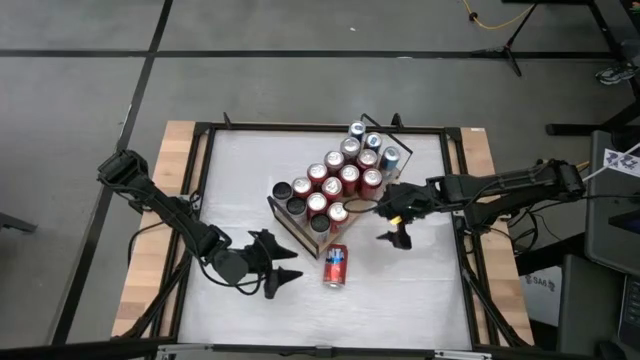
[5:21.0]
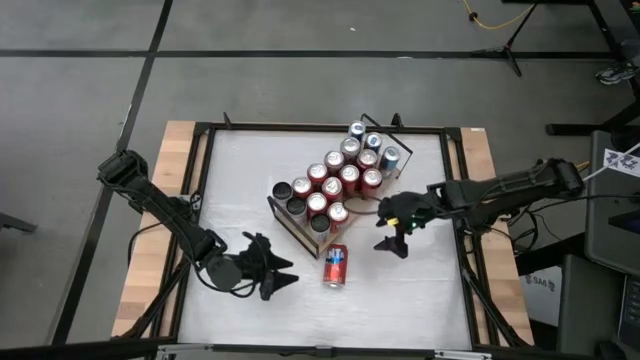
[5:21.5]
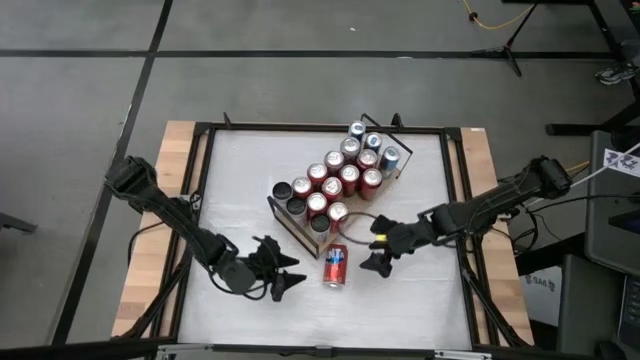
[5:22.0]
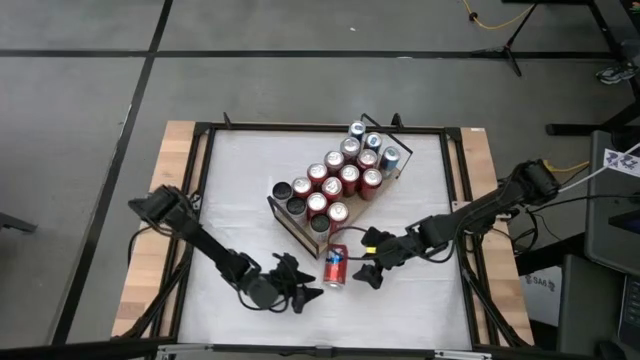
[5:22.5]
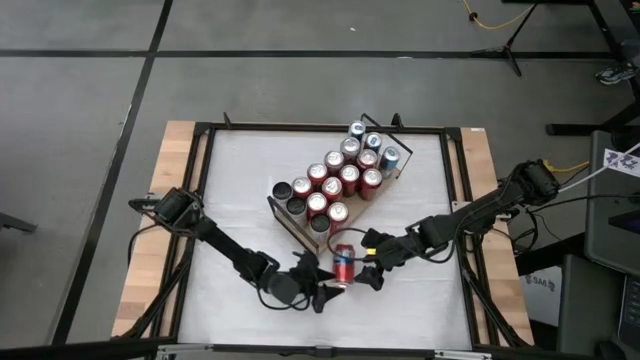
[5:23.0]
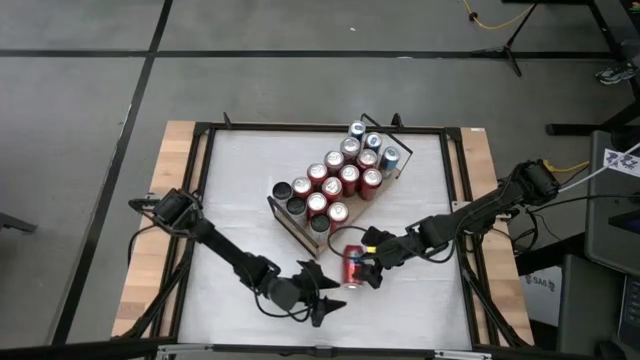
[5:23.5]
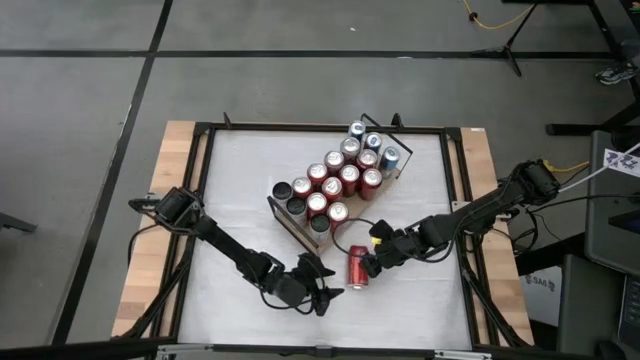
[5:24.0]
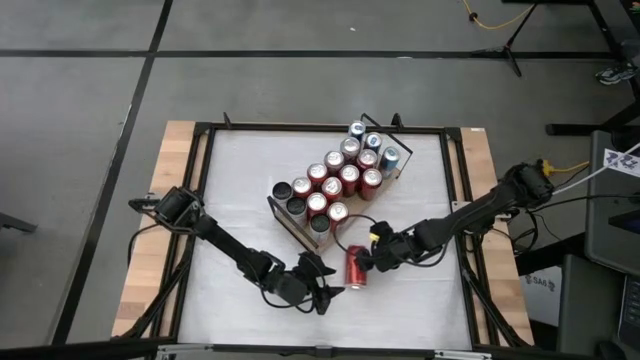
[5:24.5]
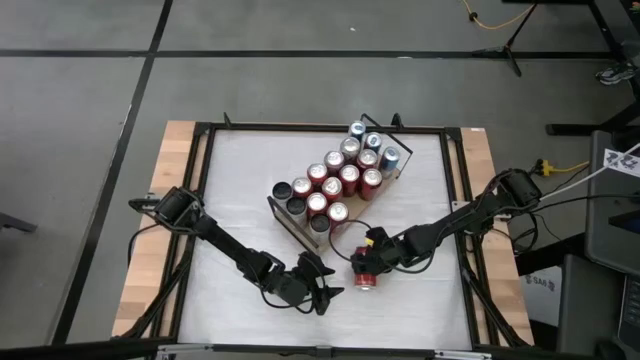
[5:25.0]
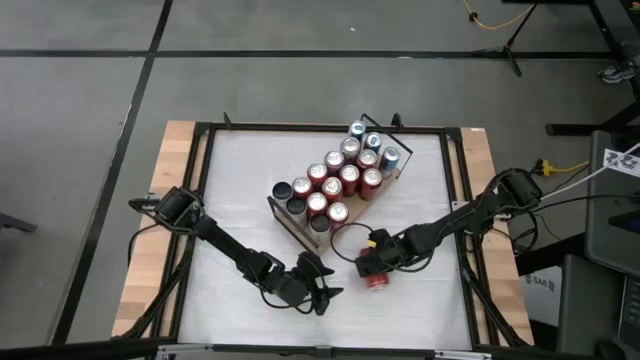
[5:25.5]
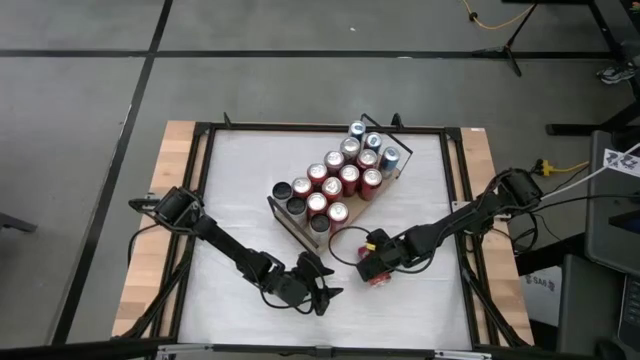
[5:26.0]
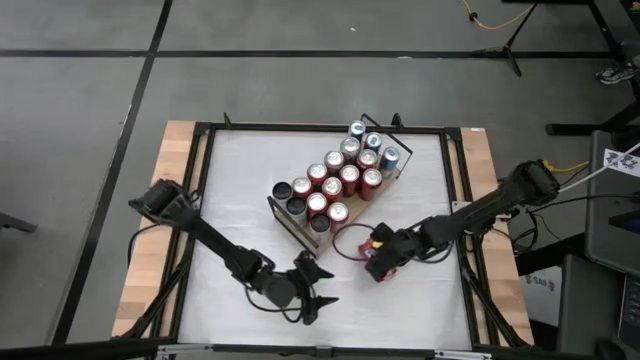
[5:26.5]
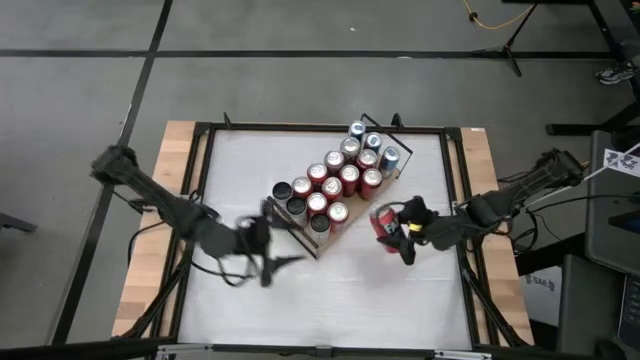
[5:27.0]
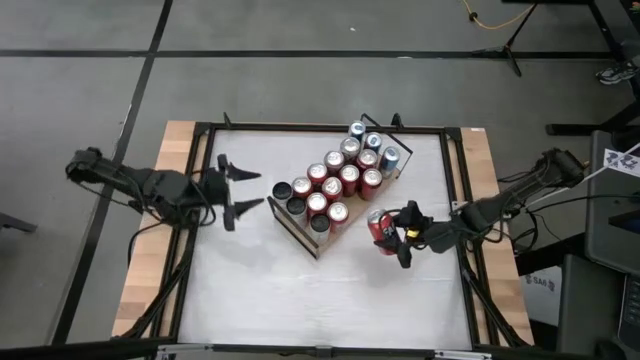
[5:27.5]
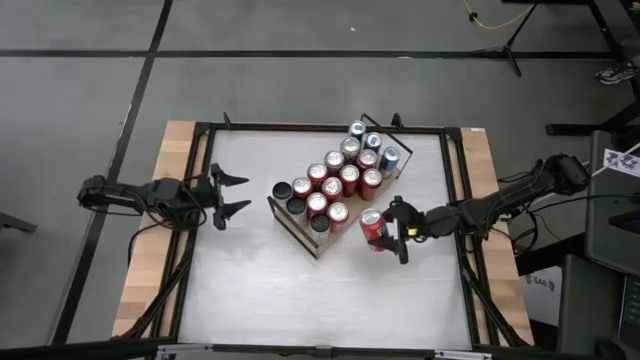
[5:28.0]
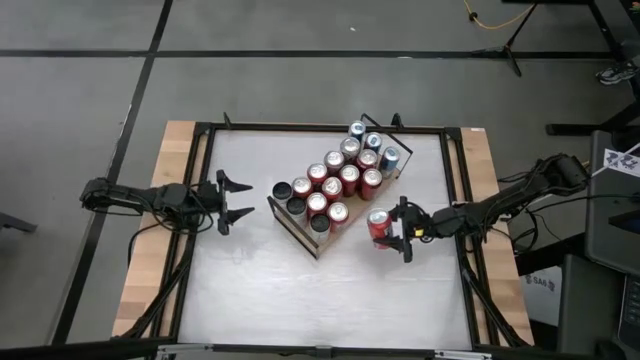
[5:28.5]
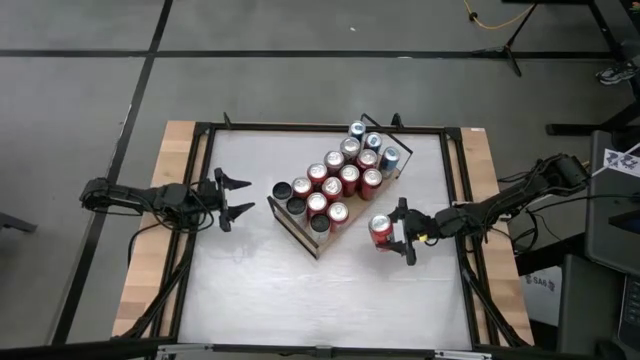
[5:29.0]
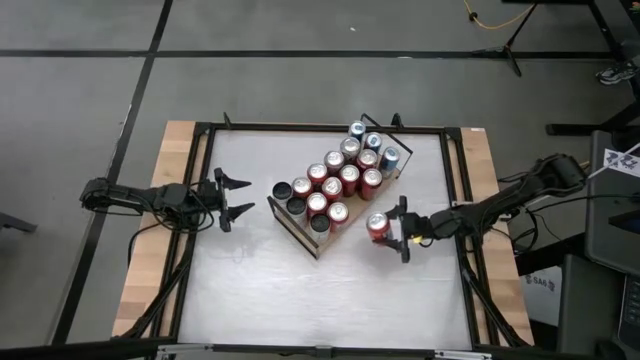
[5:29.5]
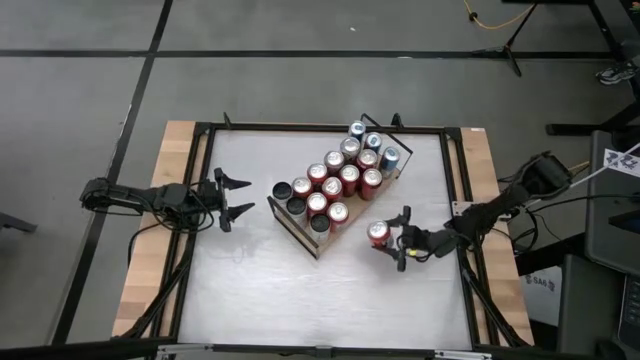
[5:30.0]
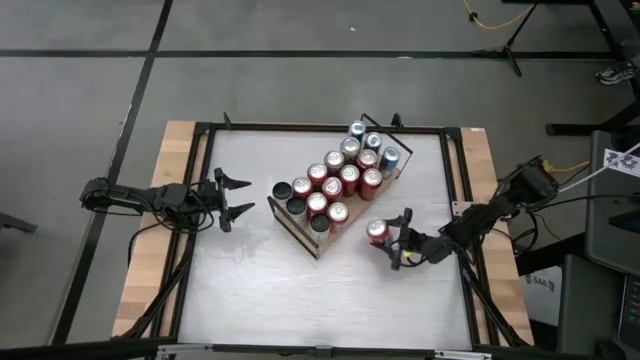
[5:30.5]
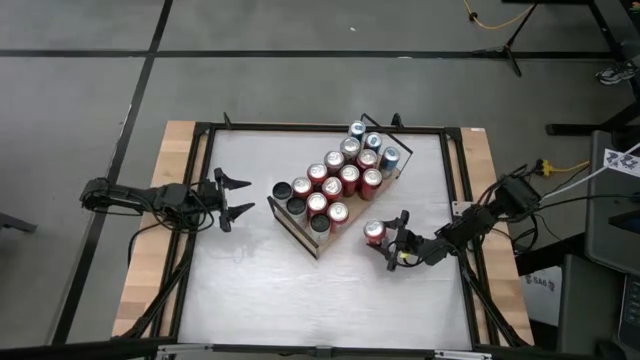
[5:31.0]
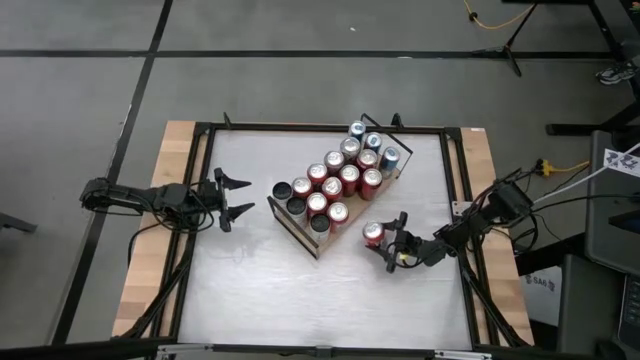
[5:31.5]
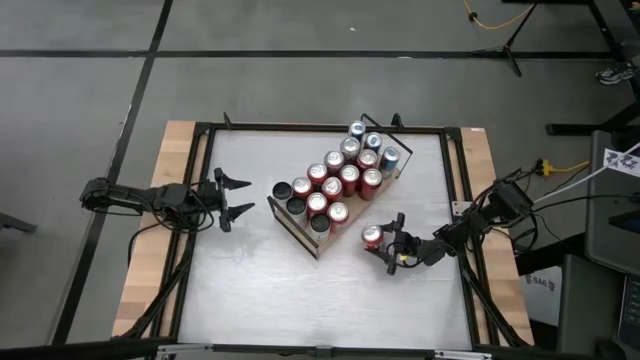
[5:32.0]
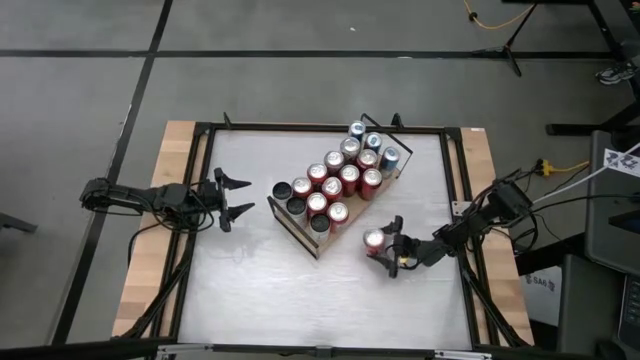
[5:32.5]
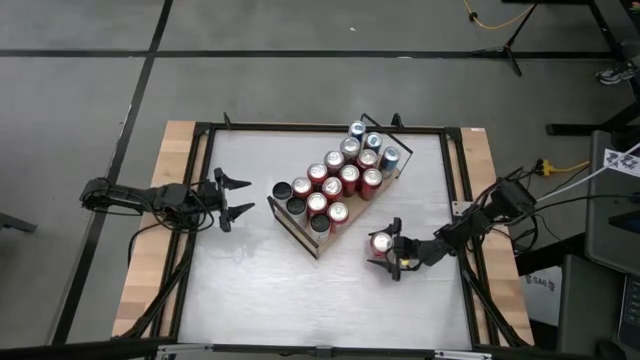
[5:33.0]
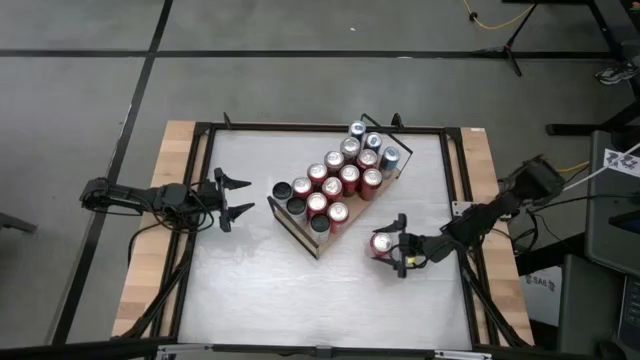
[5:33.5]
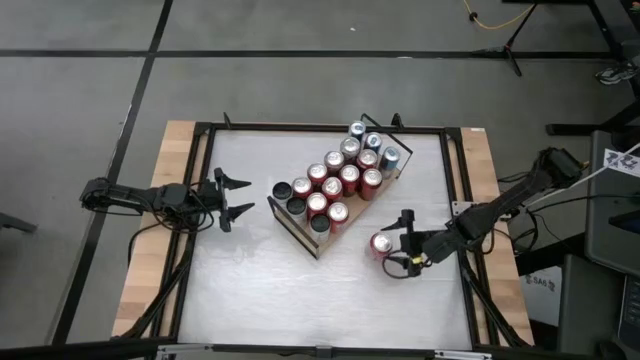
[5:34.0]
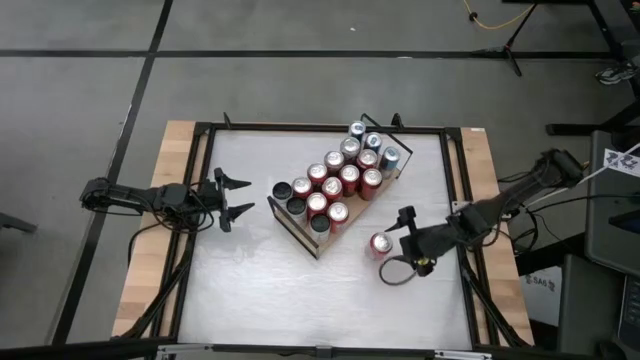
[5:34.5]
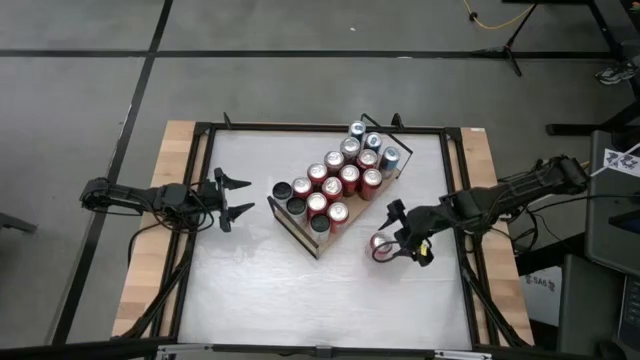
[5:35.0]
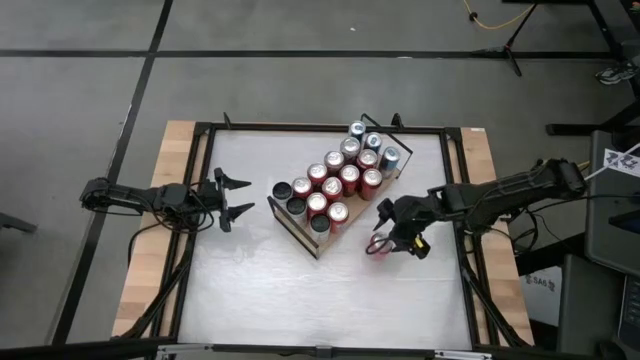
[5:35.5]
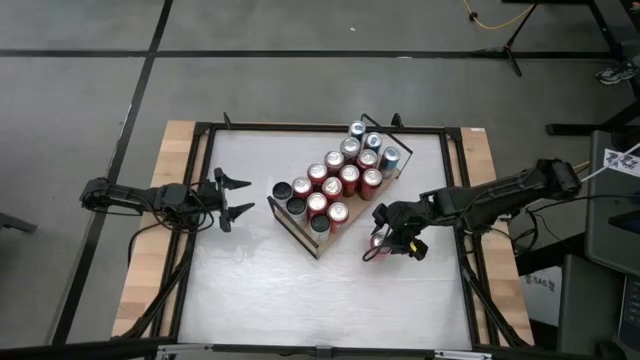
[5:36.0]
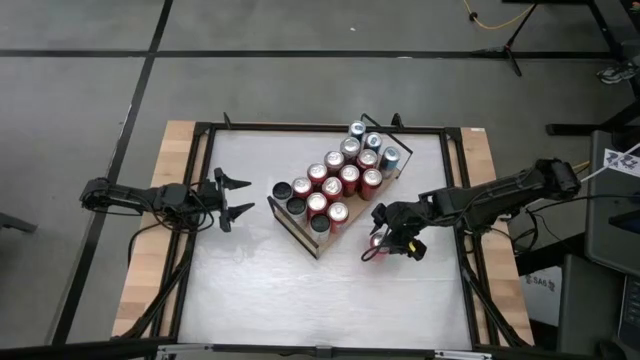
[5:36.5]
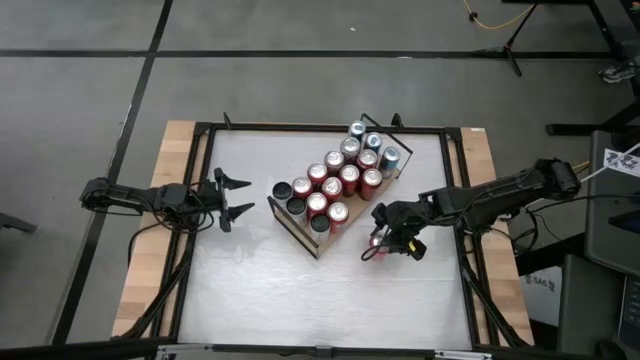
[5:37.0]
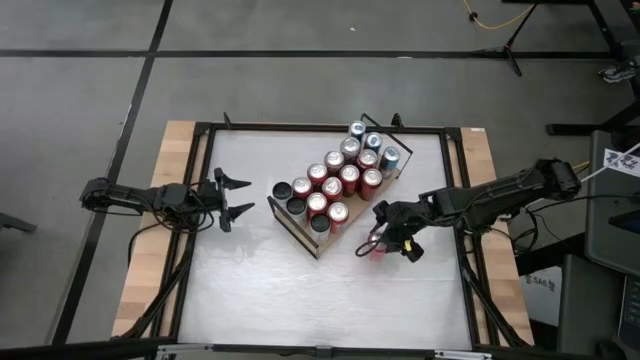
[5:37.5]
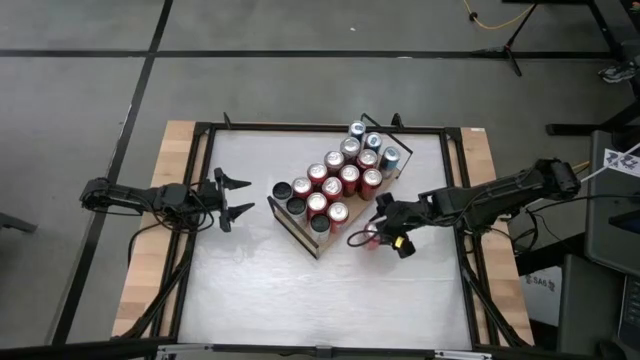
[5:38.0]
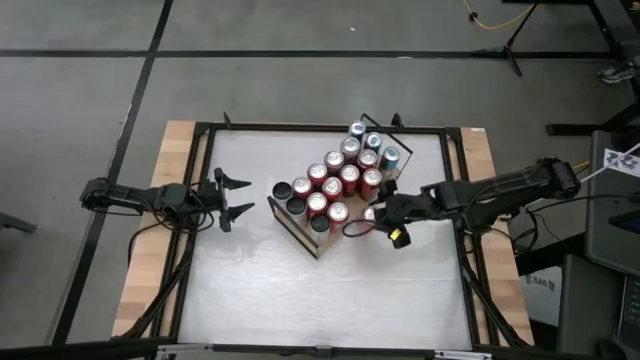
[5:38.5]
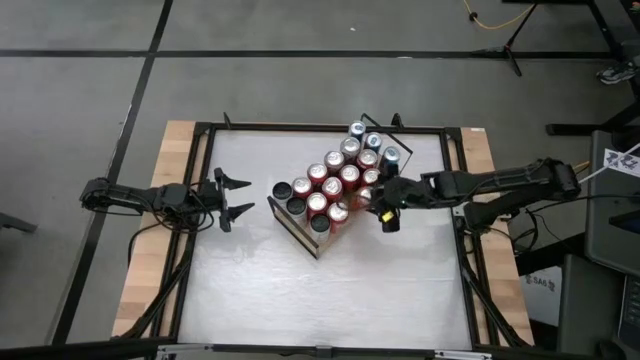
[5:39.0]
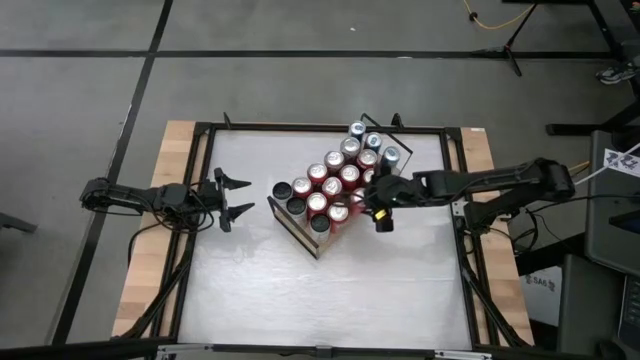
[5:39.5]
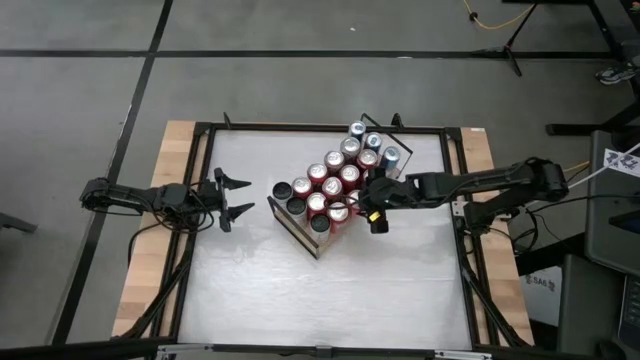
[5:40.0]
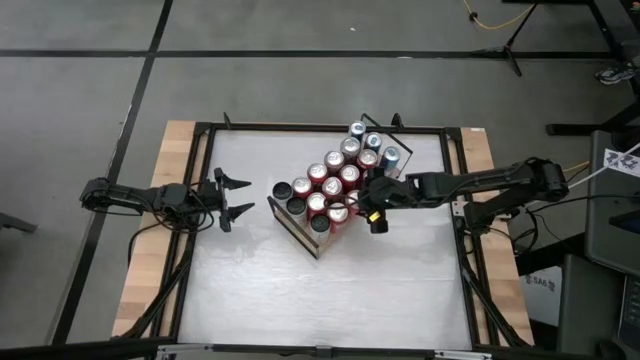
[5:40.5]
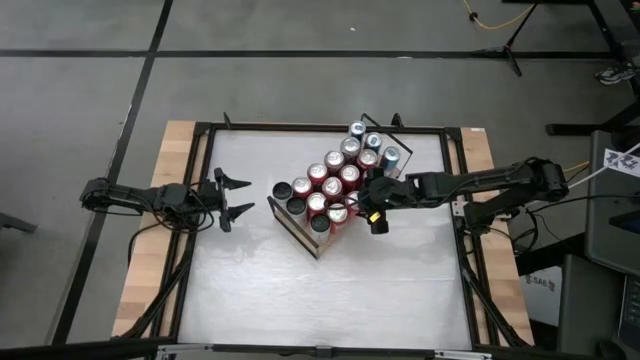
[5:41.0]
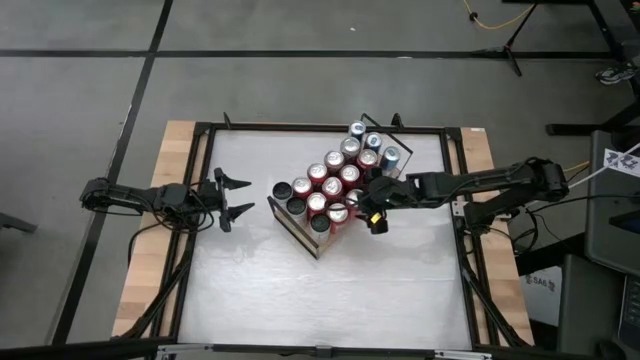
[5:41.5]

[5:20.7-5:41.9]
Task: Place canned beverage on shelf
Put the orange soda can on the shelf aligned with the other orange soda can

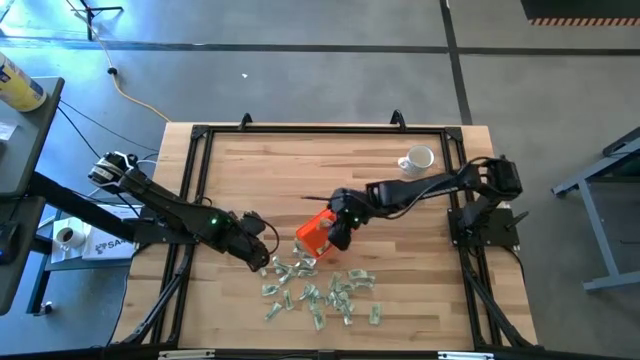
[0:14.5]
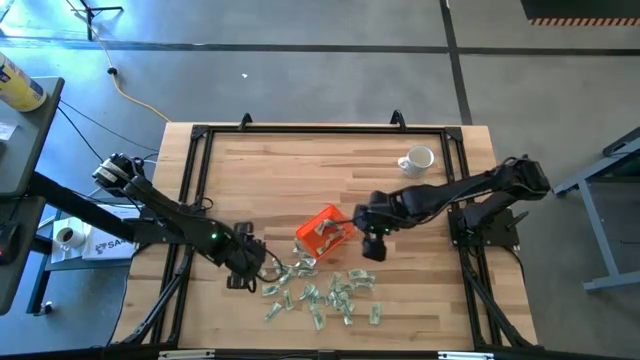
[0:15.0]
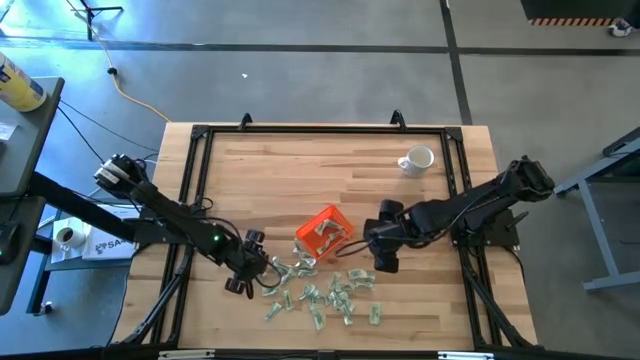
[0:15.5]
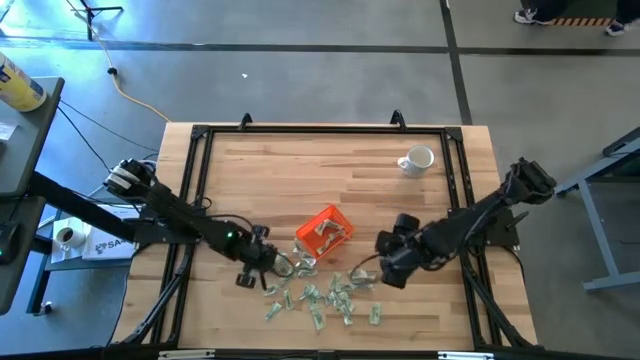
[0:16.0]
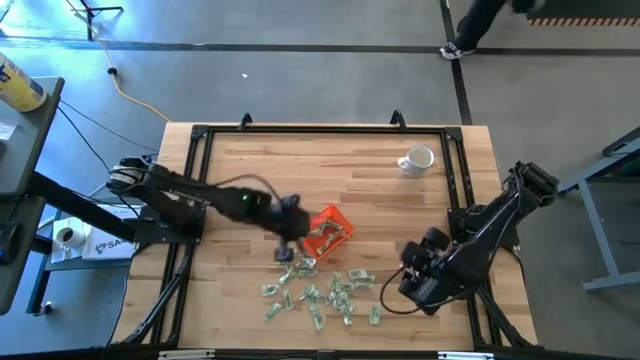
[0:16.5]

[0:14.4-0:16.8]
Task: Pick and place Stevia / Truvia into bins
Put the stevia packet into the orange bin
